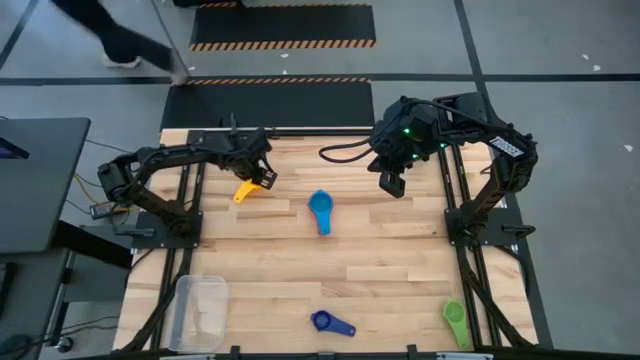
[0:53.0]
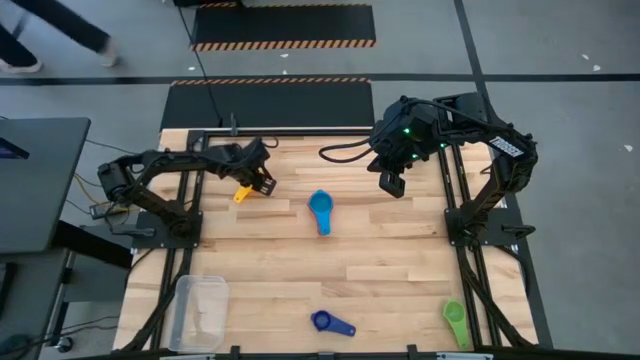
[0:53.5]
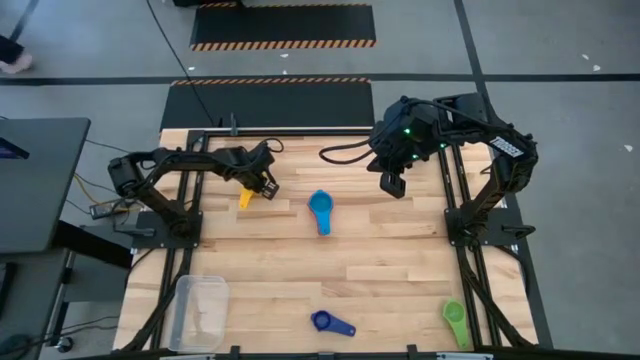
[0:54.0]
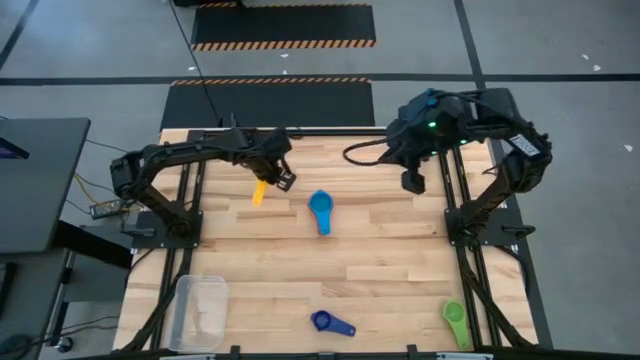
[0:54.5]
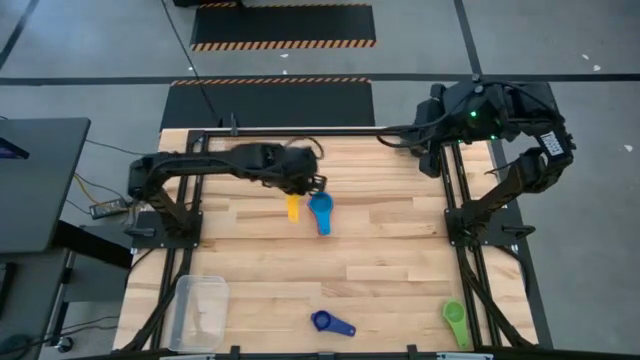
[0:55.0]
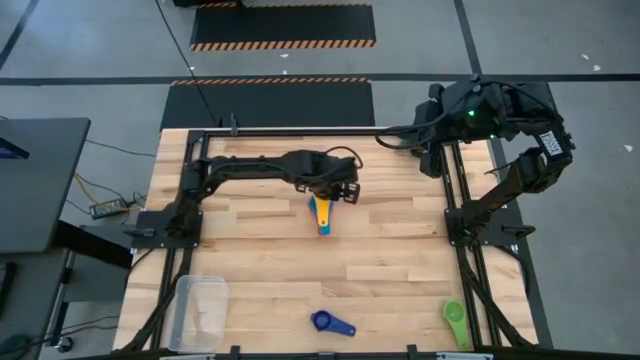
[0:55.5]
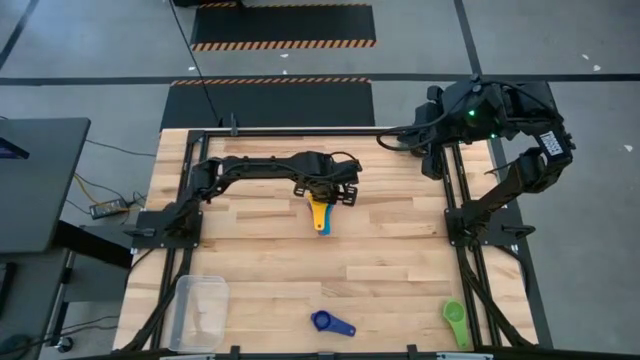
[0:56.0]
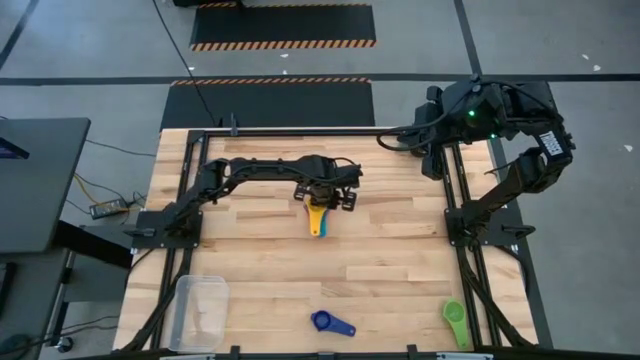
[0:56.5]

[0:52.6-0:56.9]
Task: Nest measuring cups in basket
Stack the yellow measuring cup on top of the blue measuring cup

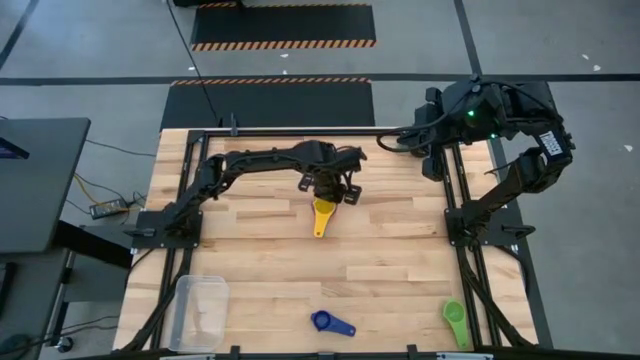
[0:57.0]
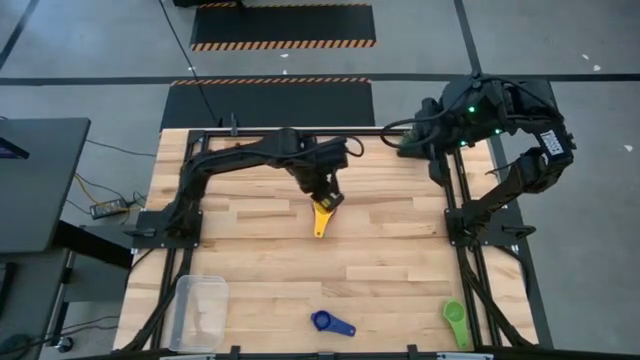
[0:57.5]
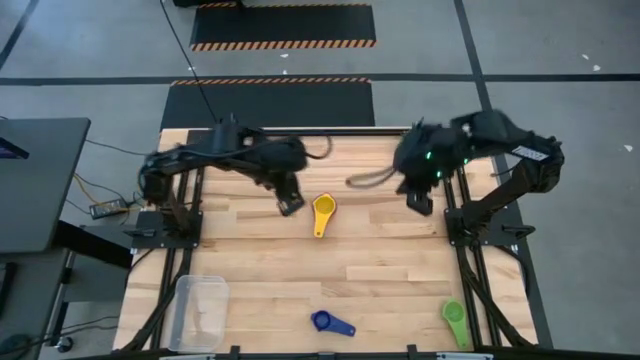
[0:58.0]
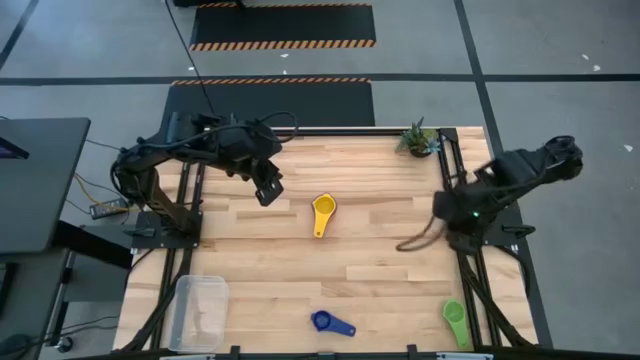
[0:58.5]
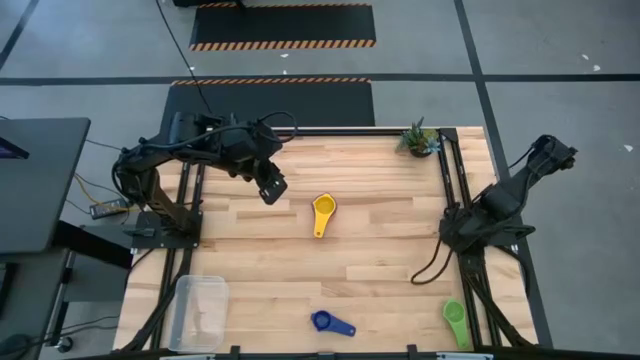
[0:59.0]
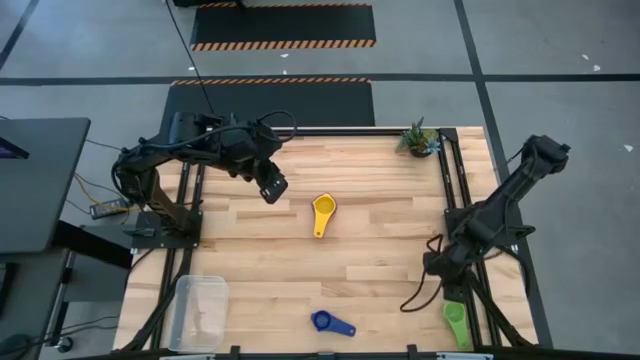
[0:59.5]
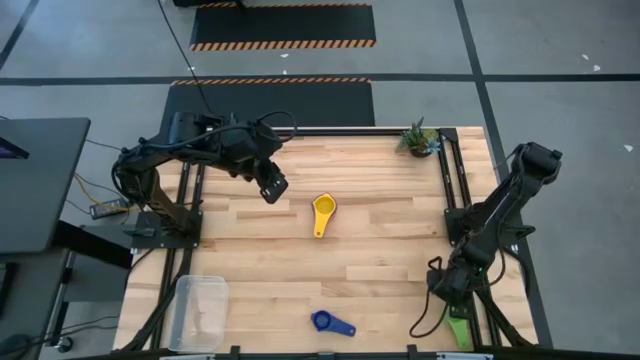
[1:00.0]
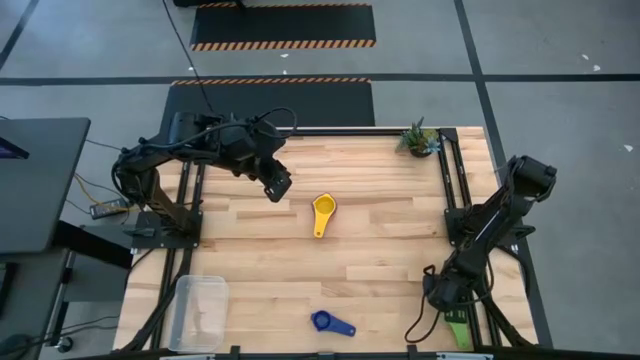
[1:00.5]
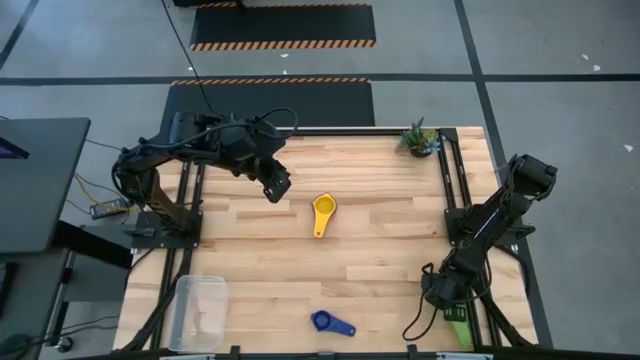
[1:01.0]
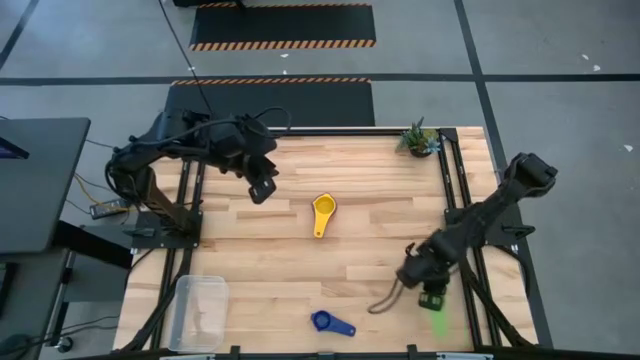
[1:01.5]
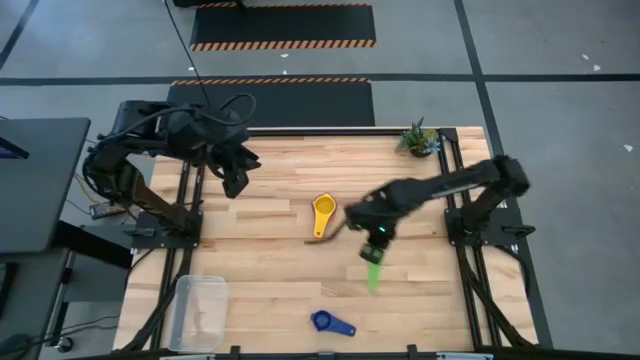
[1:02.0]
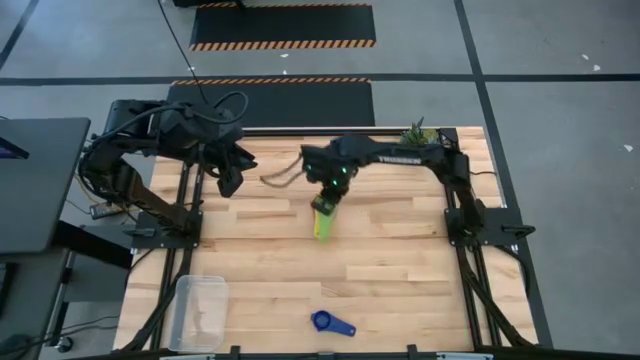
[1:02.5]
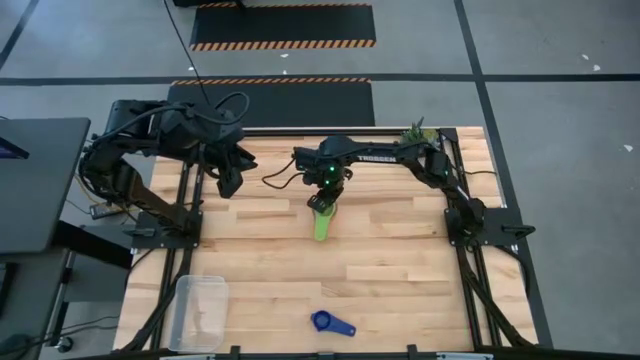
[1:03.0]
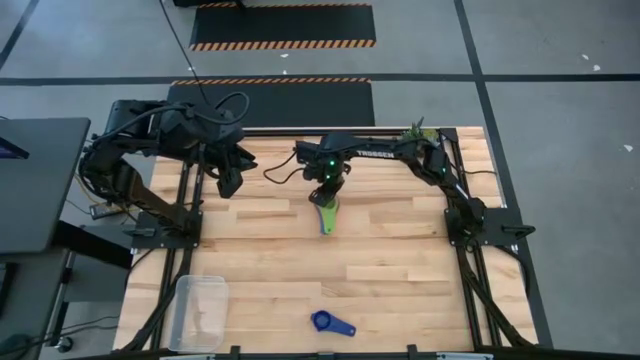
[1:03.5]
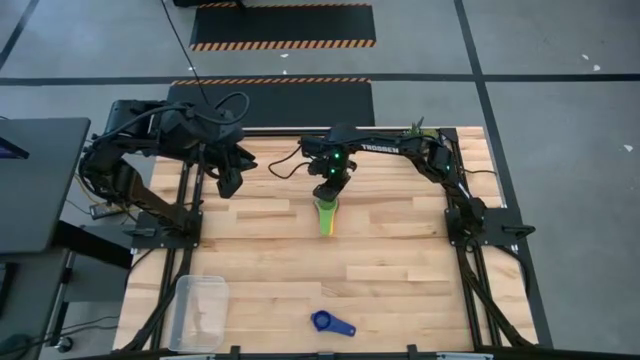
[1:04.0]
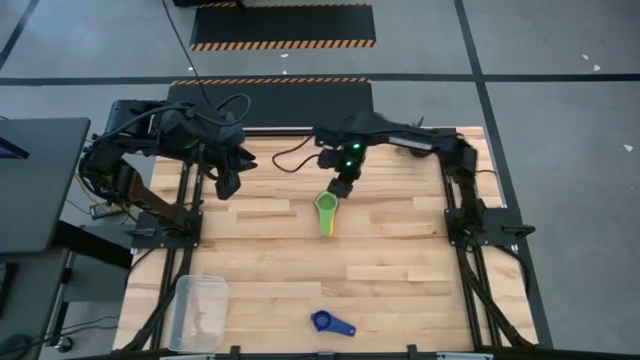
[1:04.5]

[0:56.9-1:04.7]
Stack the light green measuring cup on top of the yellow measuring cup

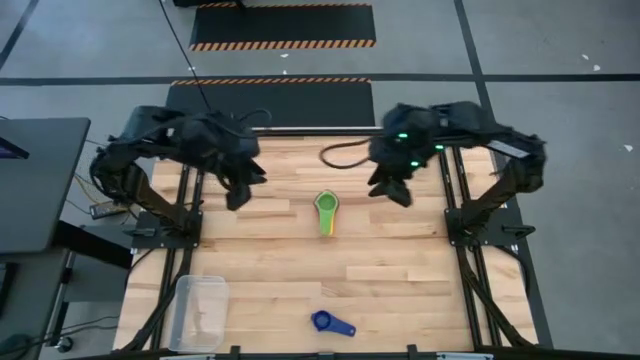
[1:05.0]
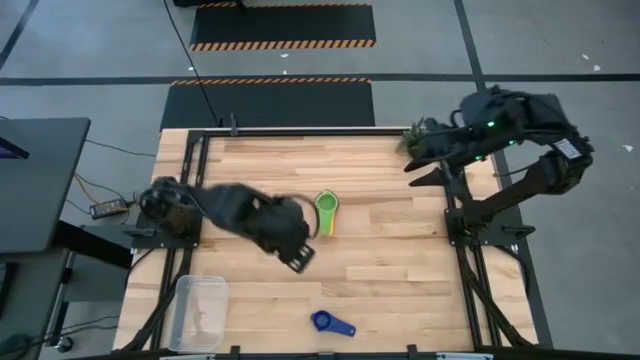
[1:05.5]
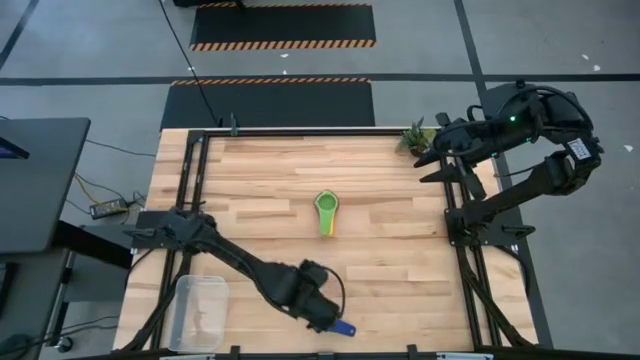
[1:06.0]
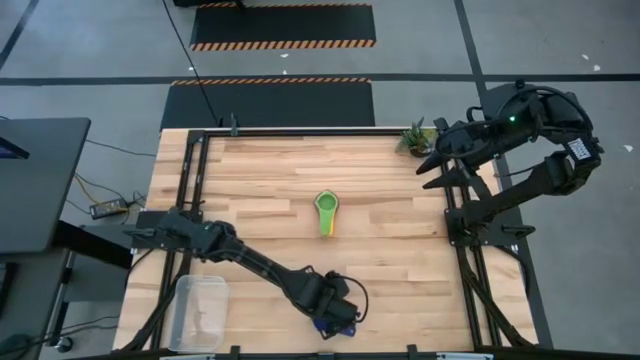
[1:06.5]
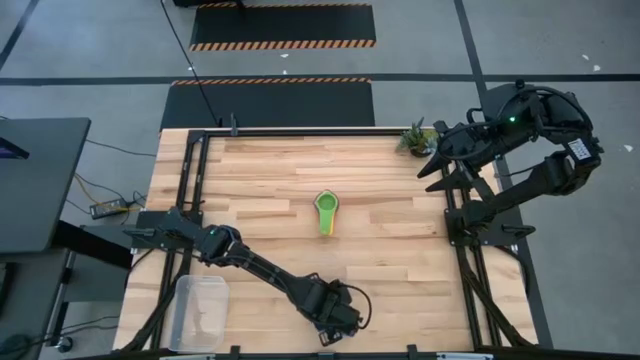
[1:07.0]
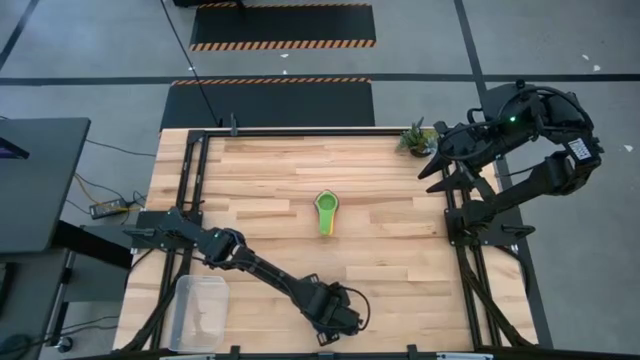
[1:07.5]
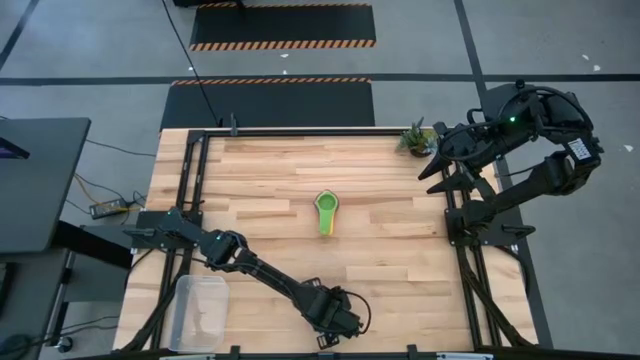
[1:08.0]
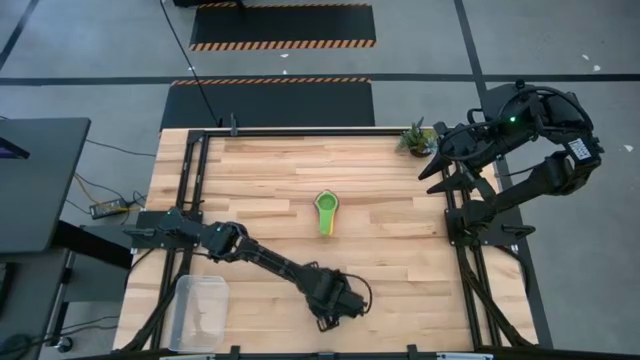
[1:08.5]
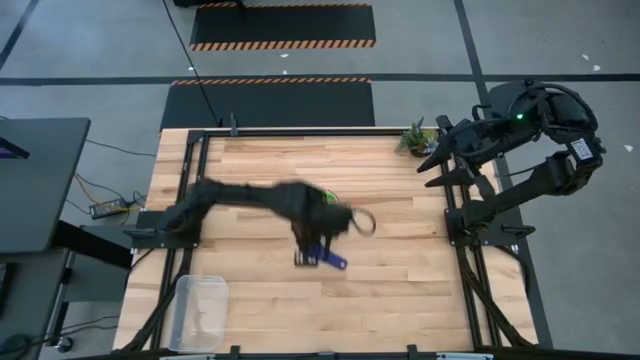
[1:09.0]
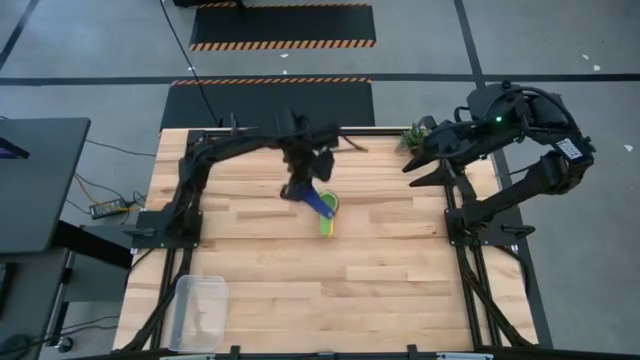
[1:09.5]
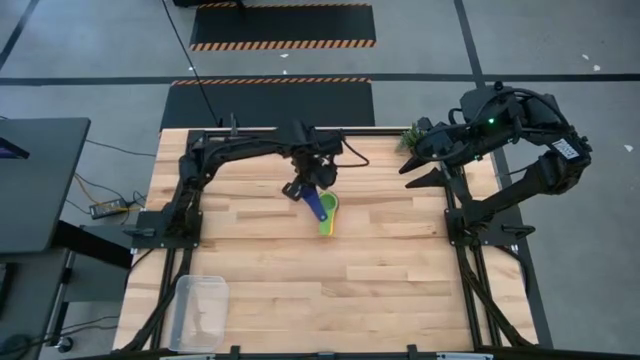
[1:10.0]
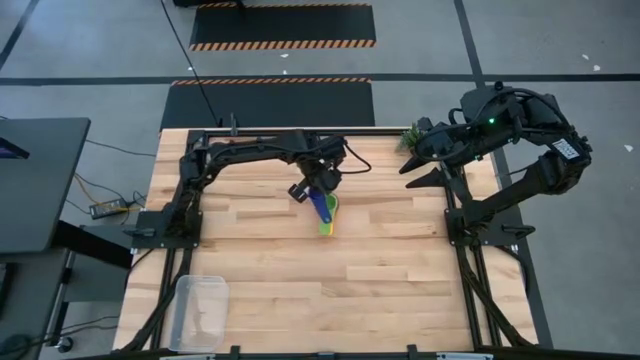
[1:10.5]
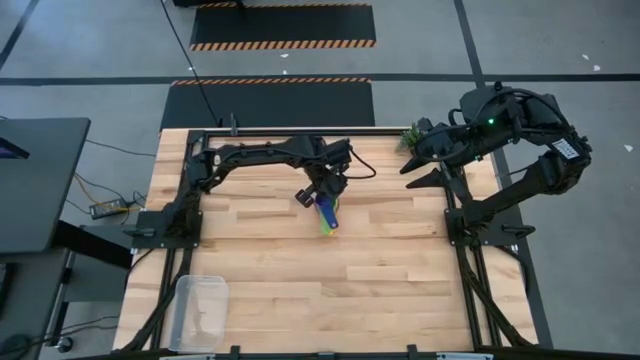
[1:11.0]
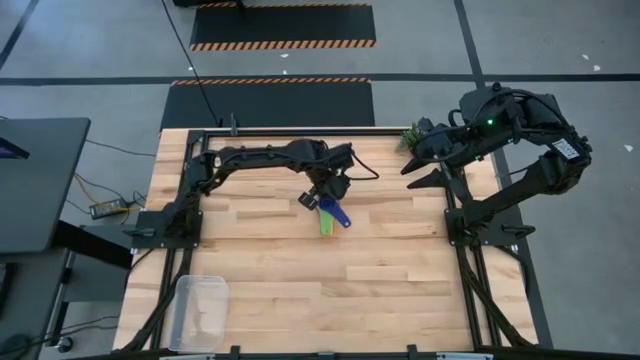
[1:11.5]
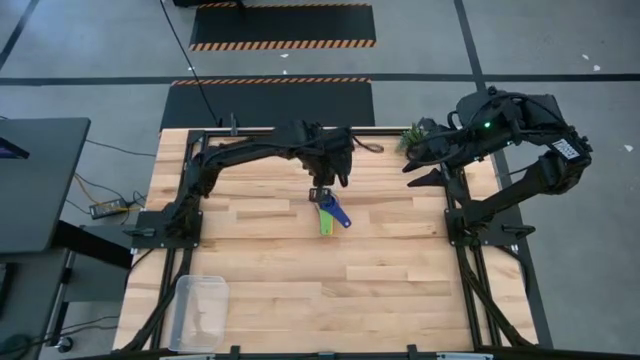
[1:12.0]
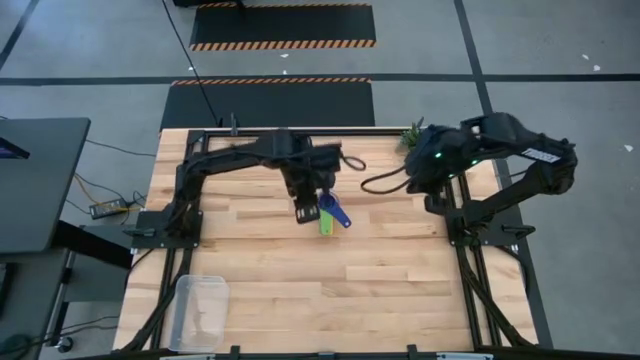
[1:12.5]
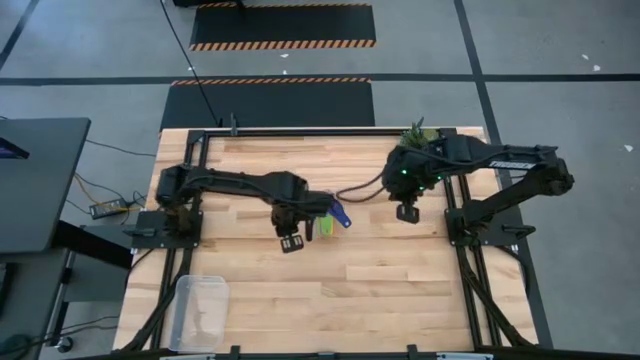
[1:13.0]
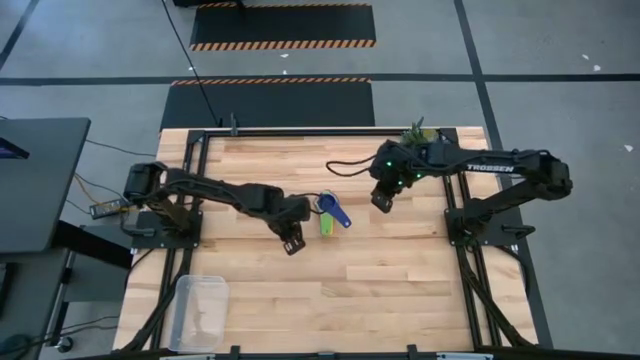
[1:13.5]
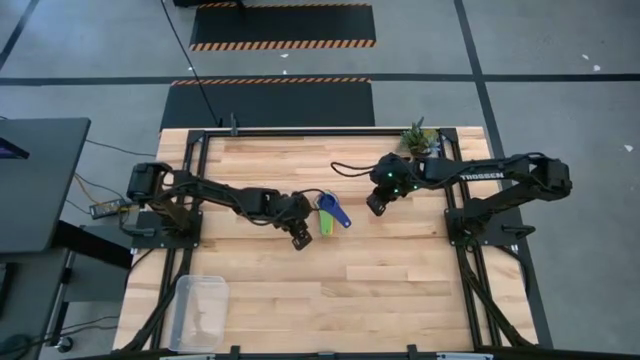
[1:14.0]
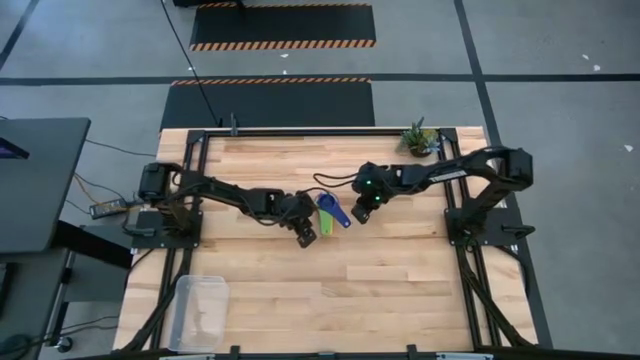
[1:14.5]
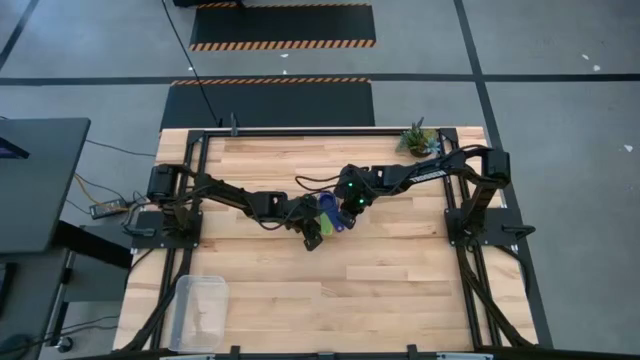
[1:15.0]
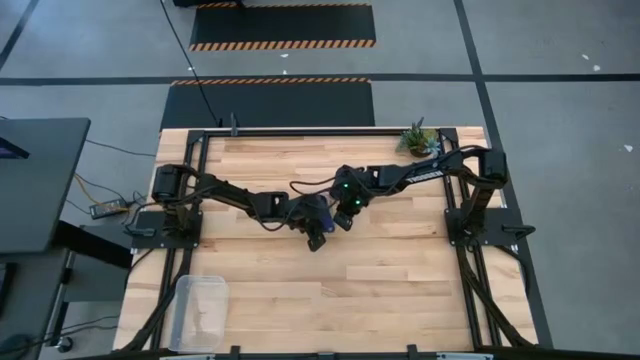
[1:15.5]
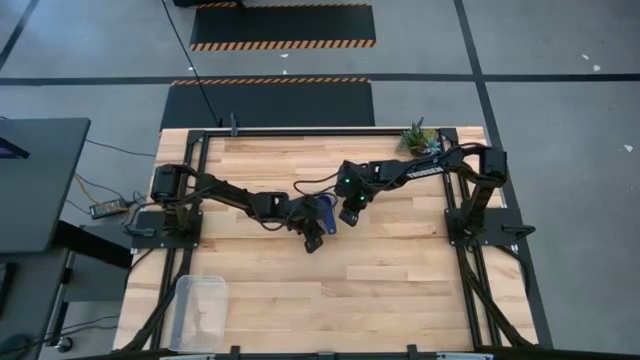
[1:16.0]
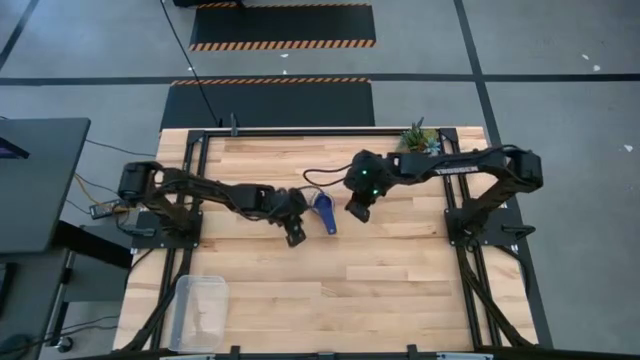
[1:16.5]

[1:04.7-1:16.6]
Stack the dark blue measuring cup on top of the light green measuring cup
